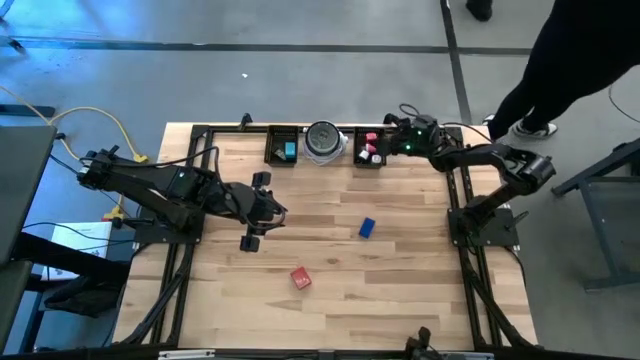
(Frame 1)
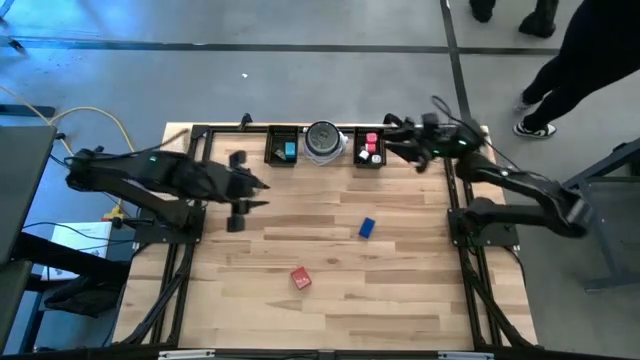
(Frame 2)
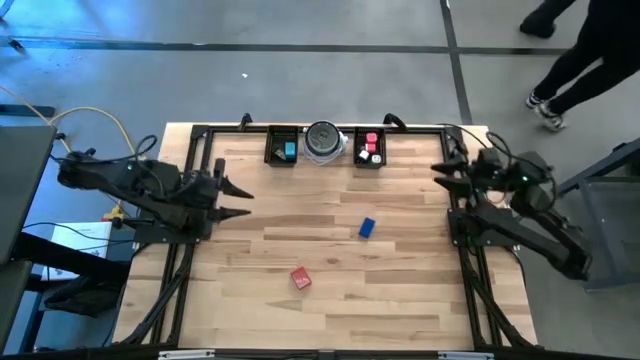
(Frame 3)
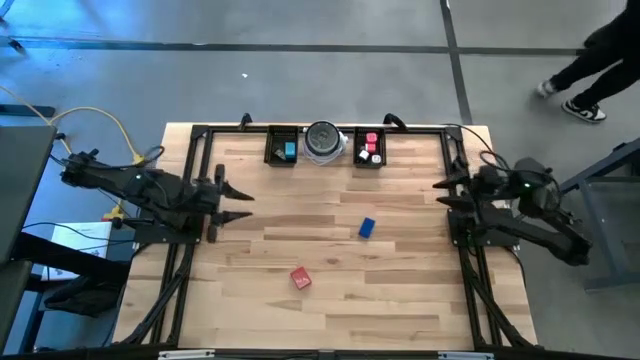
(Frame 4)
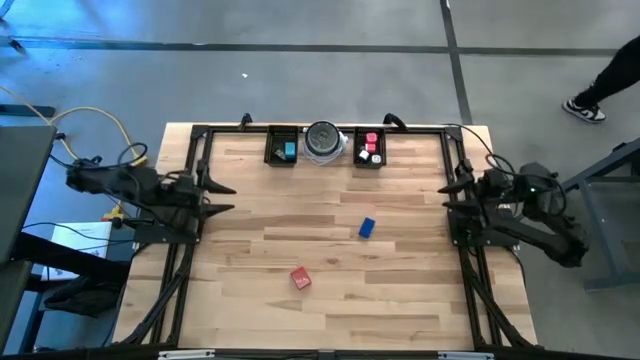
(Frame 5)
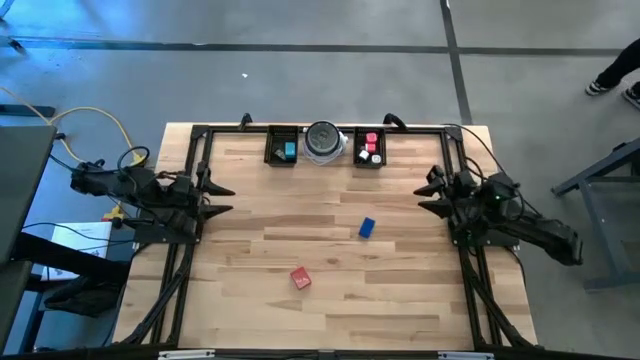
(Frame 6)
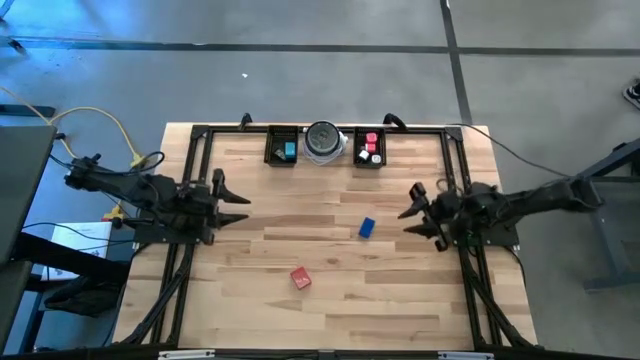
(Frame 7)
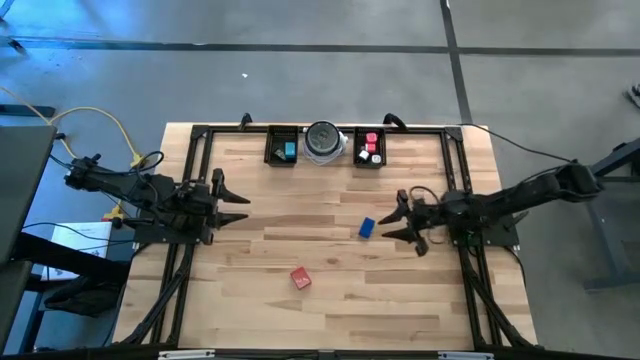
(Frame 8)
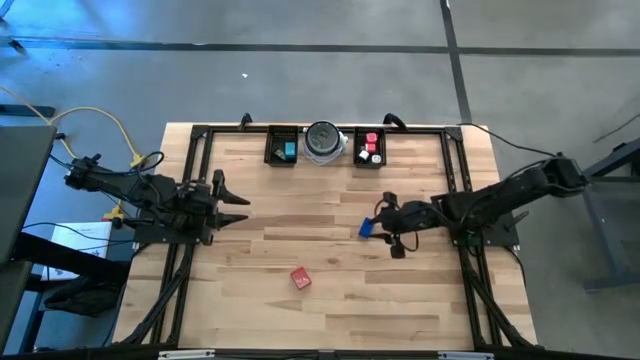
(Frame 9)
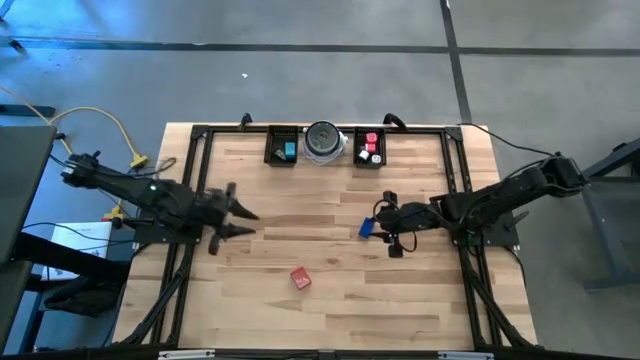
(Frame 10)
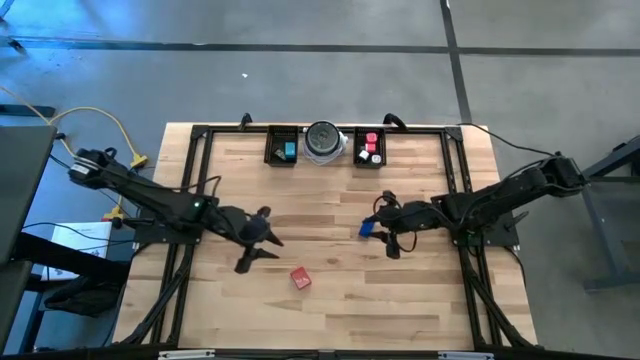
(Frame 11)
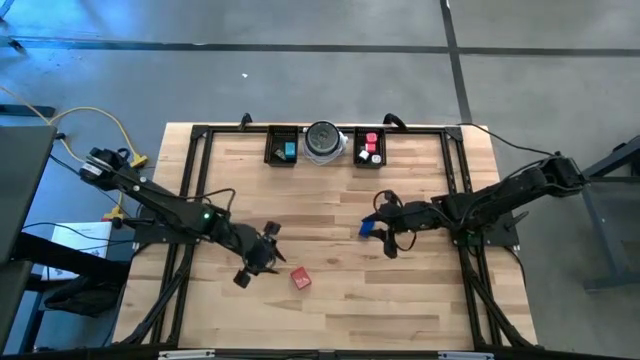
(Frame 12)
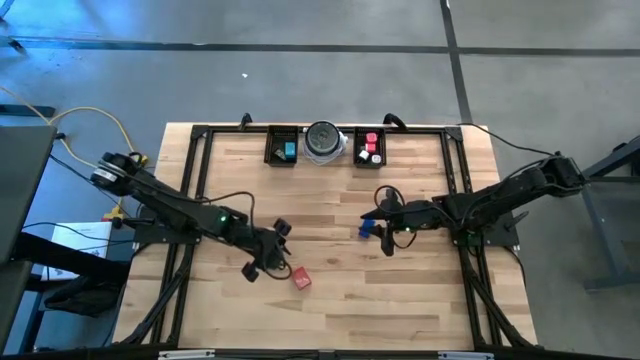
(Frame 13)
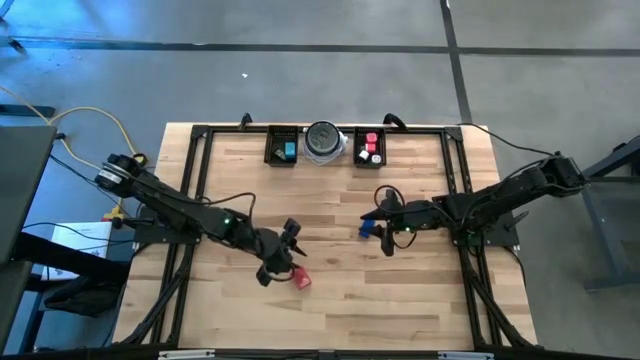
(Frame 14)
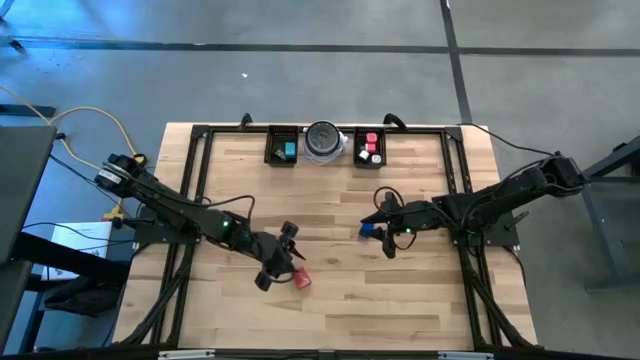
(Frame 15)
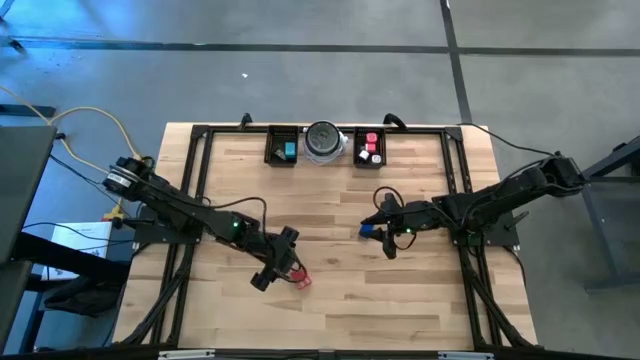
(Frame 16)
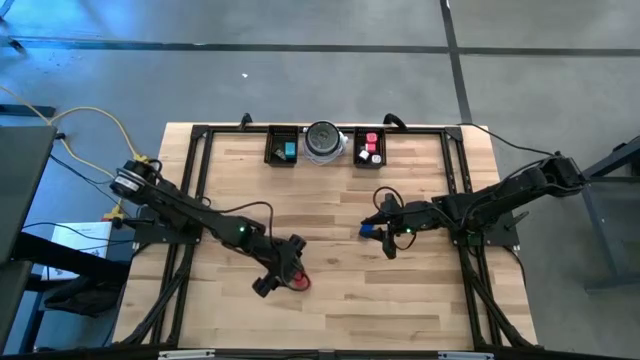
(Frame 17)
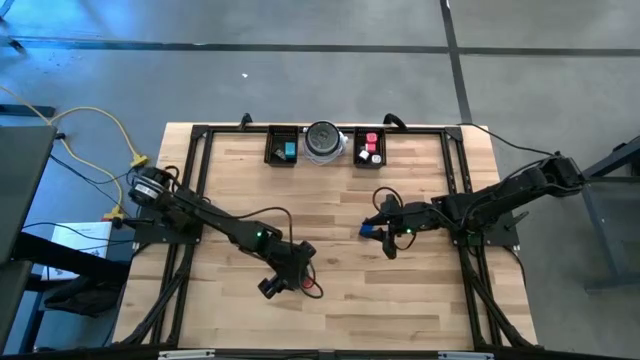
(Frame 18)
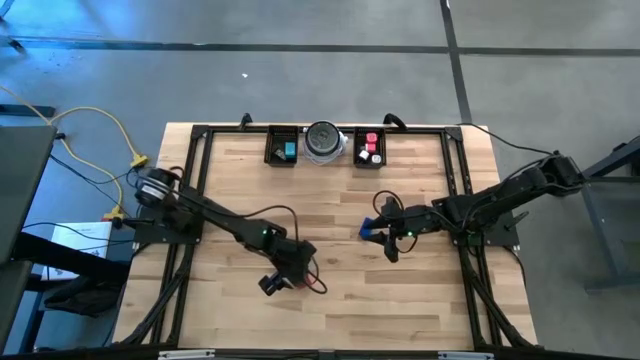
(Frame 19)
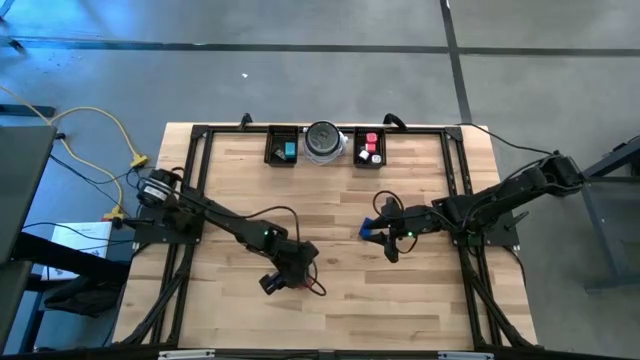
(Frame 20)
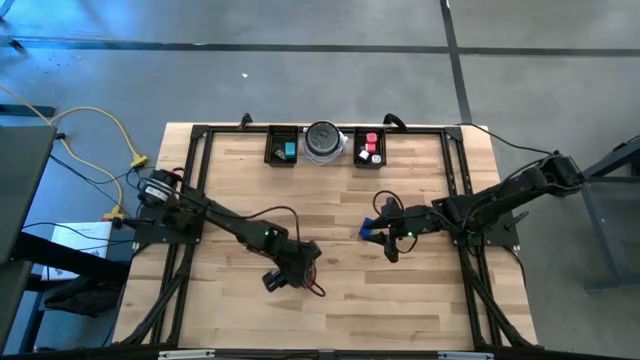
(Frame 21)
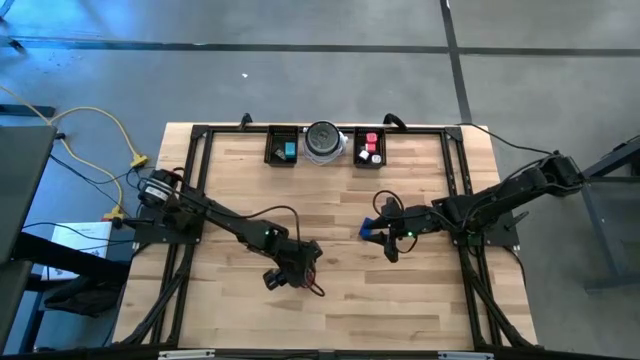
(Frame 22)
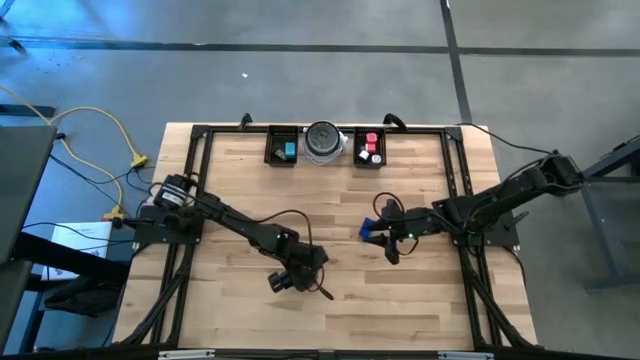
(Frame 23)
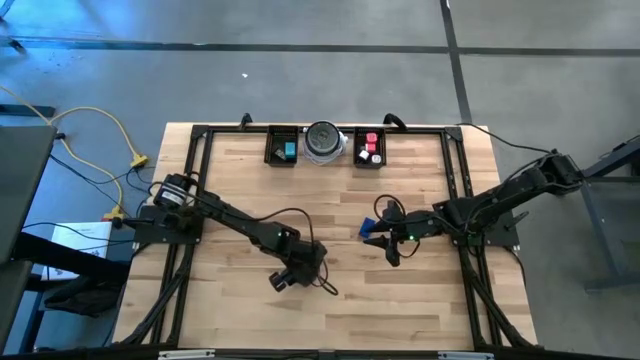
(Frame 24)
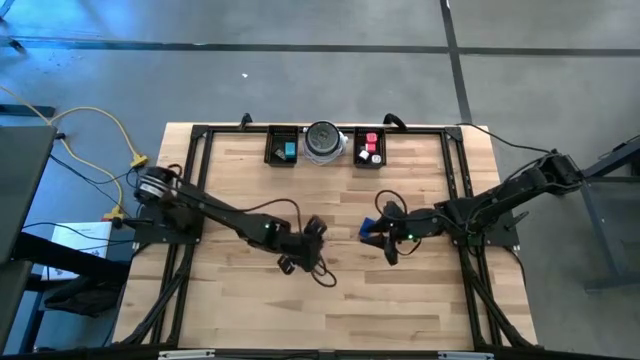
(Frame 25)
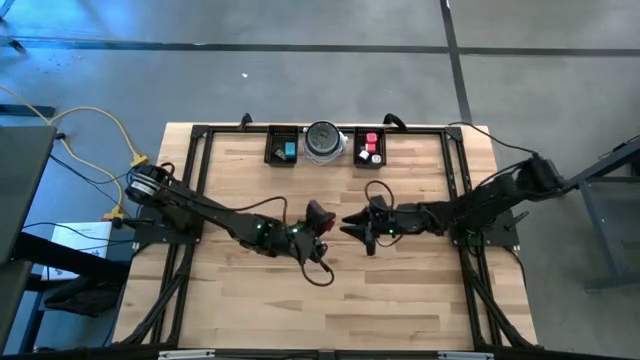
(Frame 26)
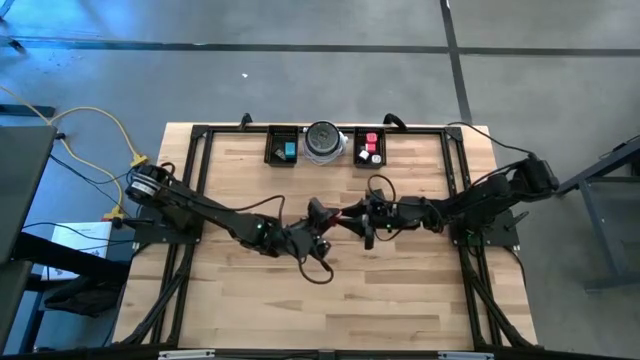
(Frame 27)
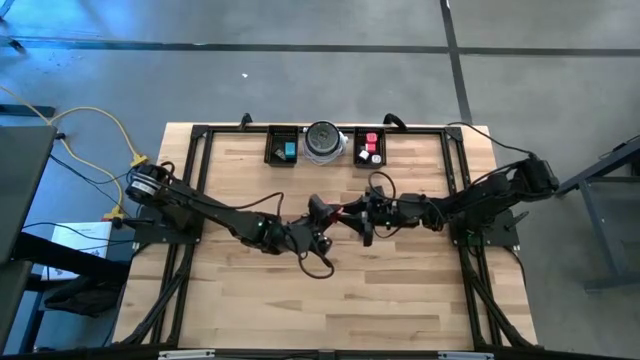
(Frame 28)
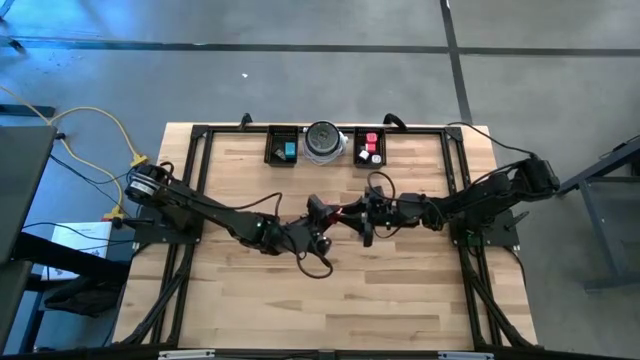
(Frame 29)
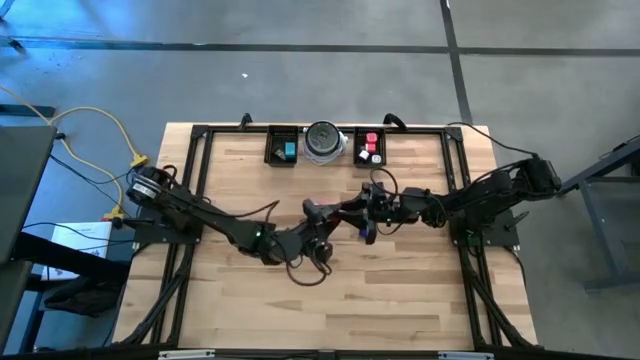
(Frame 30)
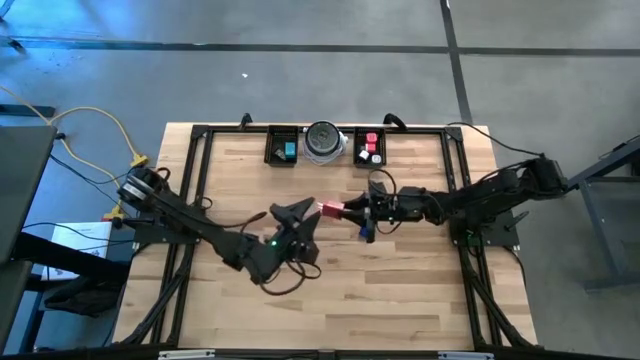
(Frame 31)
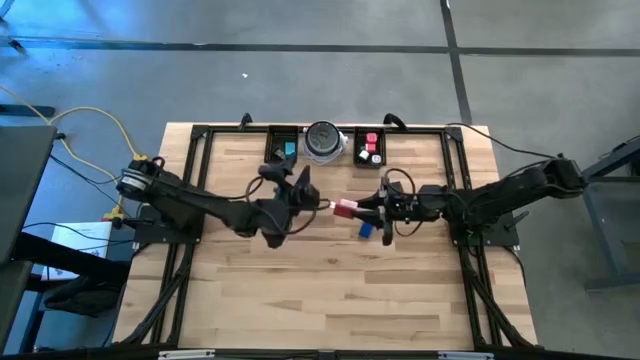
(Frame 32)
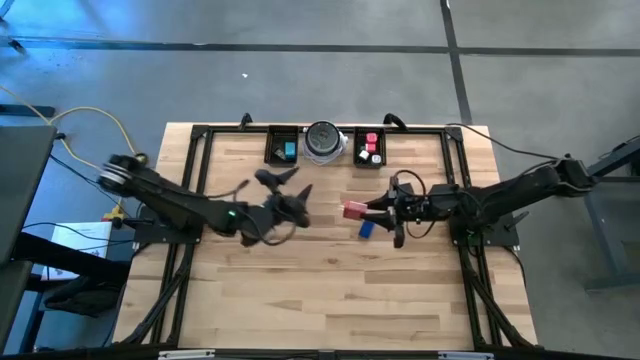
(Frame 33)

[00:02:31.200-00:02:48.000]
Task: Pick & Place Office items
Put the red charger adapter into the right black basket

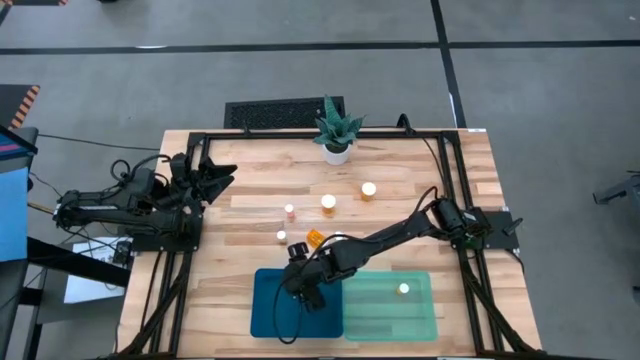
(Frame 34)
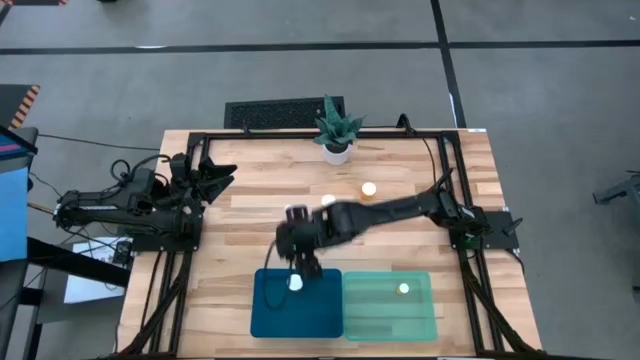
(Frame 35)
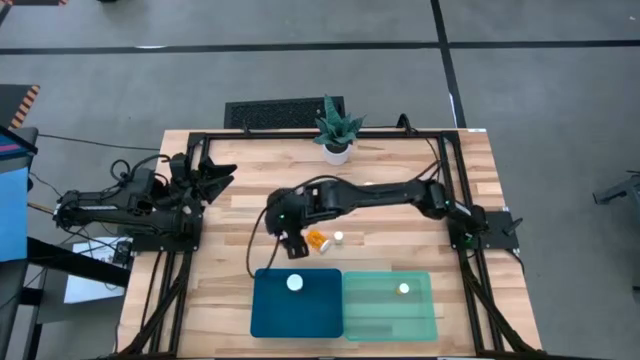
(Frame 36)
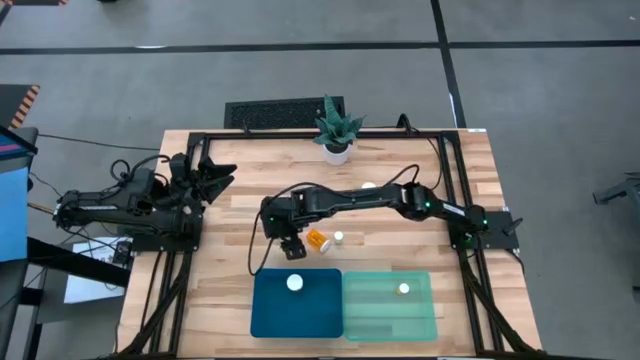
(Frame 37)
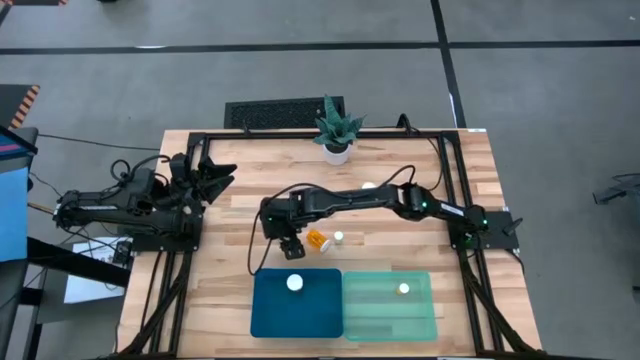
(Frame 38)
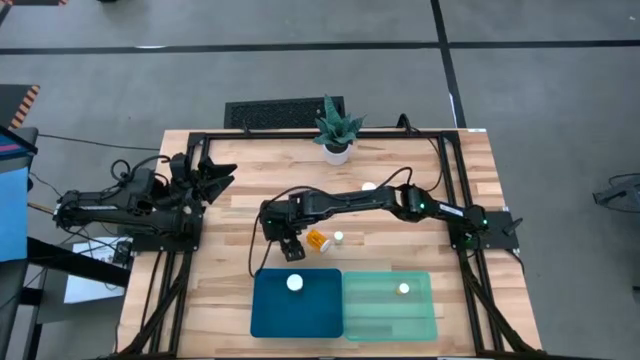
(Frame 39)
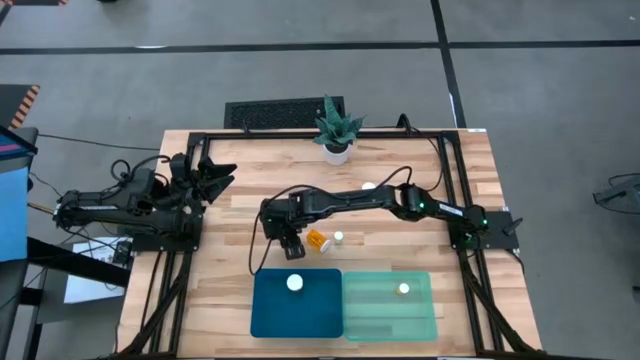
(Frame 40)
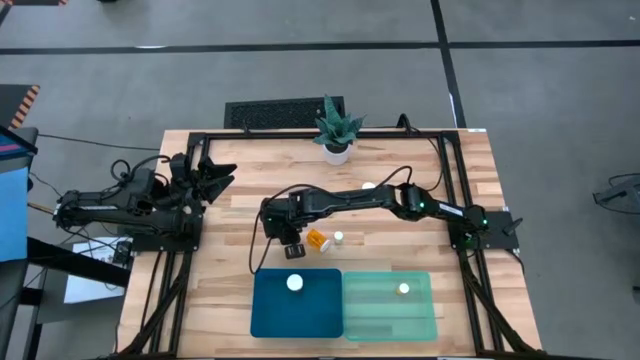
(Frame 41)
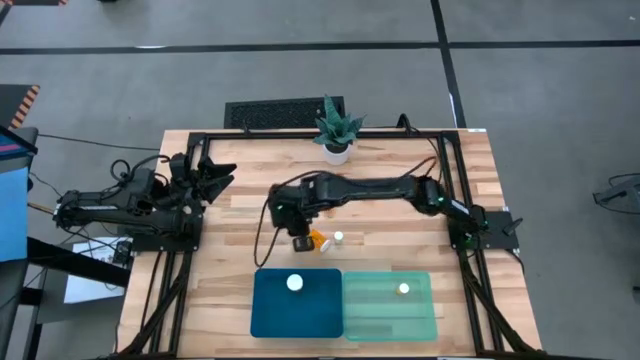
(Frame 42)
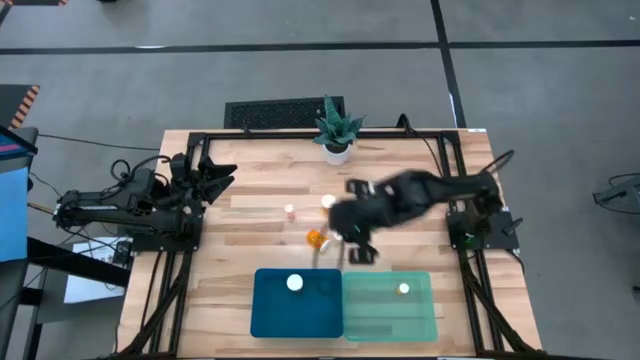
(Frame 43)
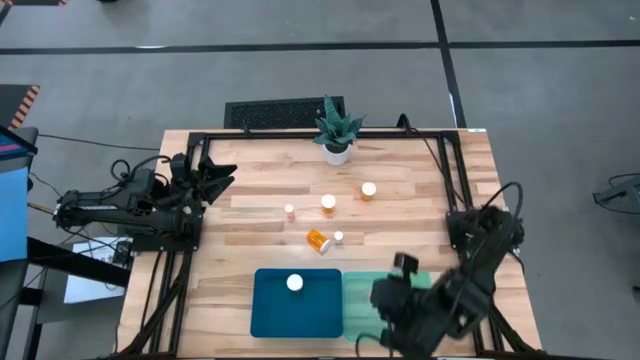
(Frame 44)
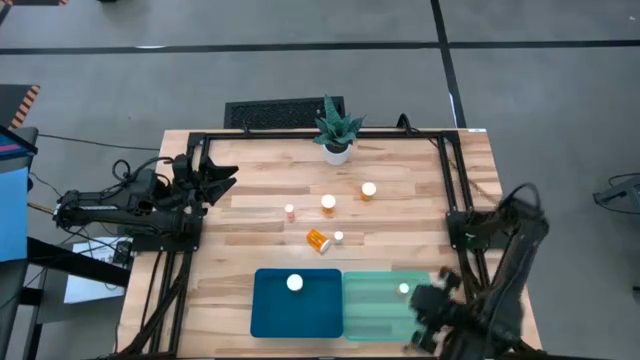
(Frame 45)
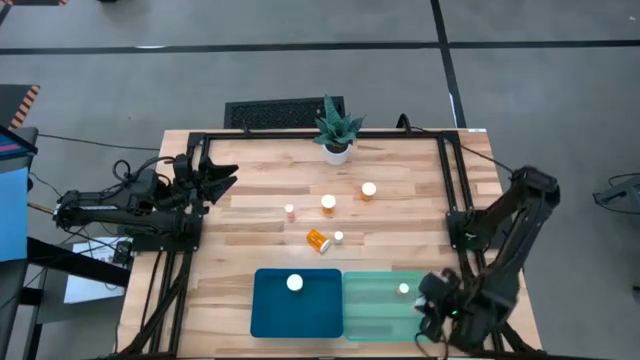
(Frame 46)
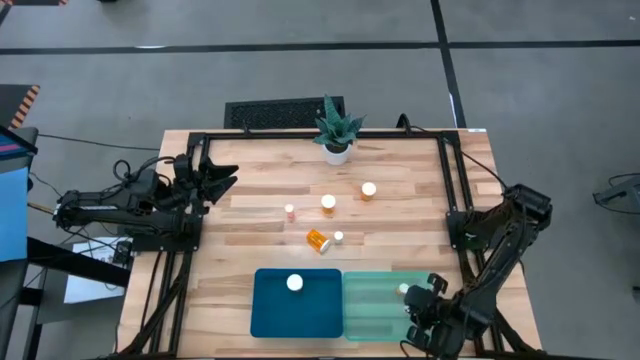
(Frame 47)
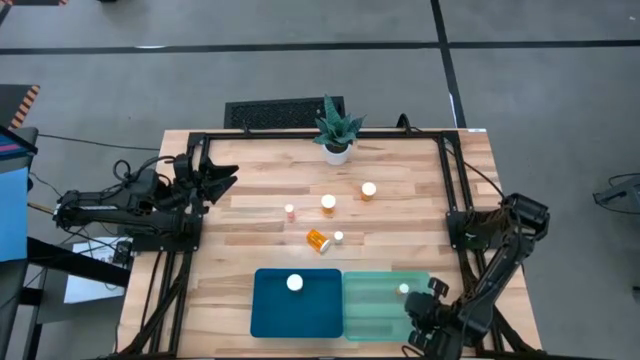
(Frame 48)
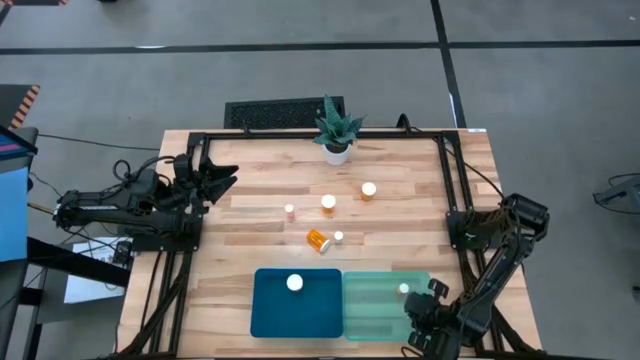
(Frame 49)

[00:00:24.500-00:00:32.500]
Task: Pick and place medicine bottles into bin by pill shape (circle, oval)
Put the small yellow pill bottle into the light blue bin
